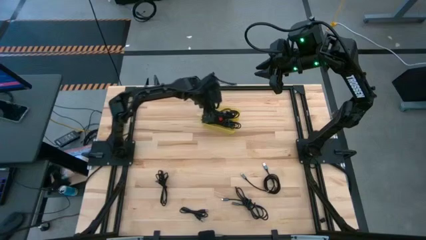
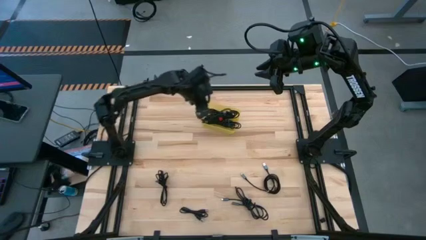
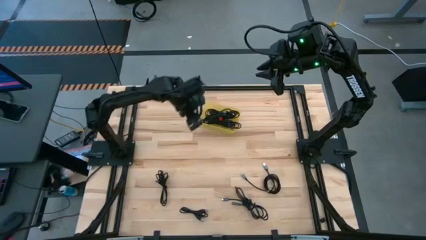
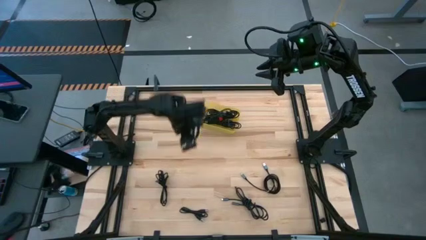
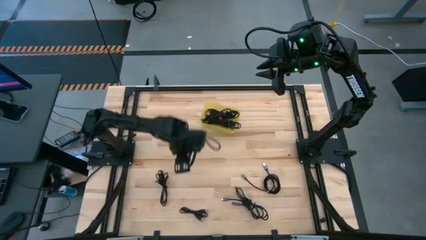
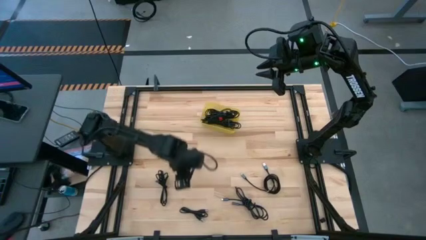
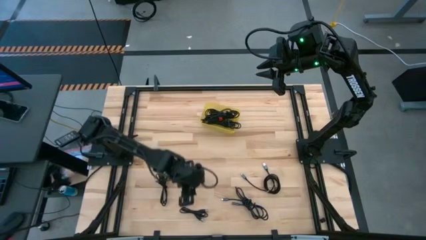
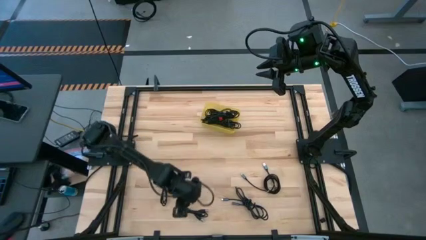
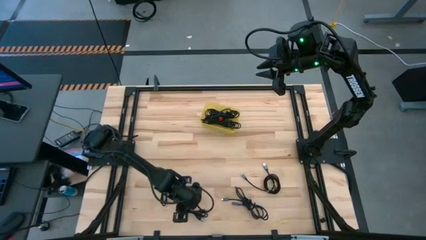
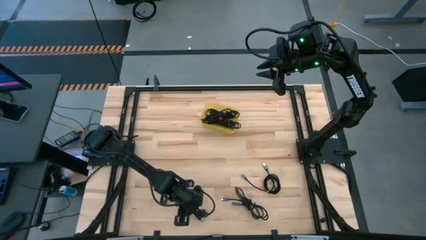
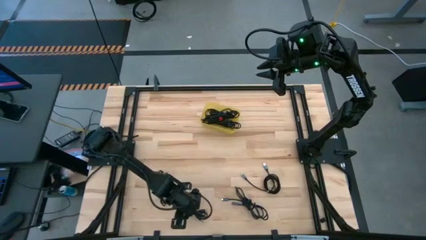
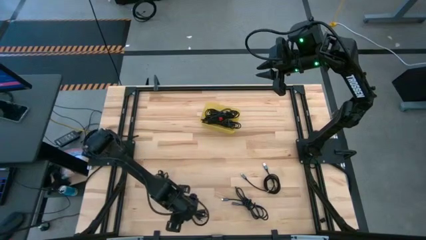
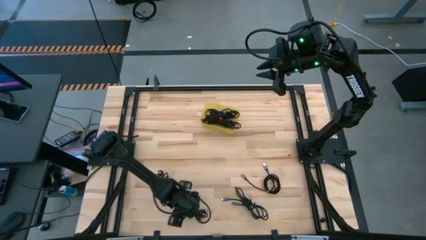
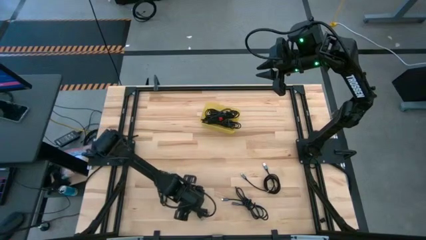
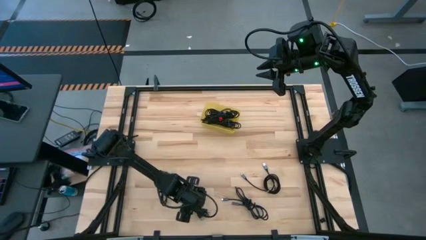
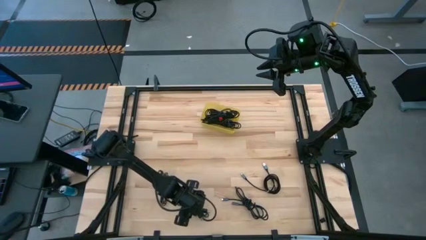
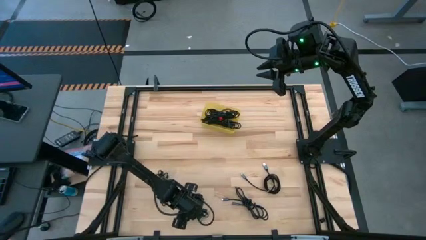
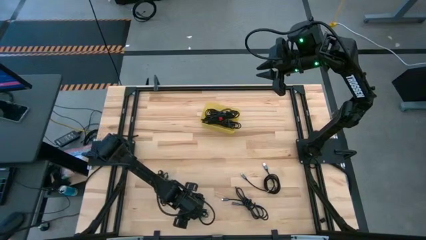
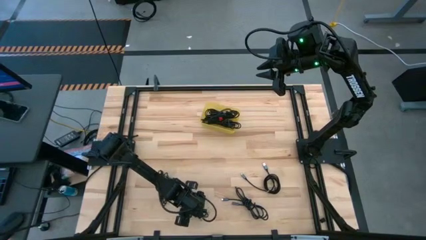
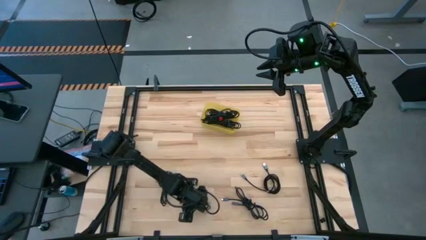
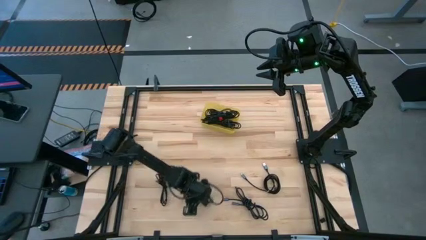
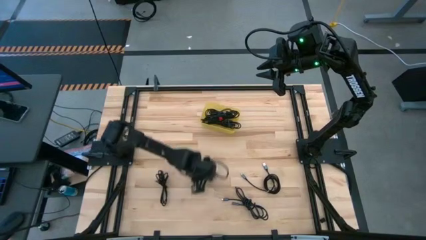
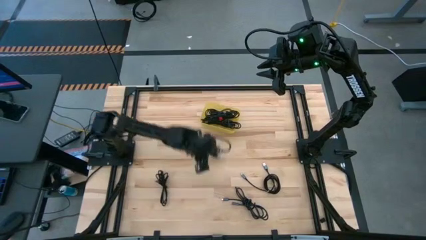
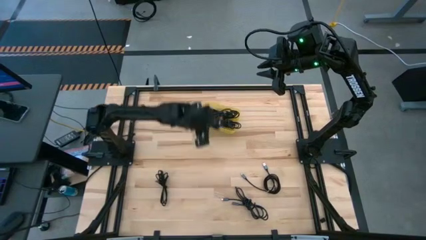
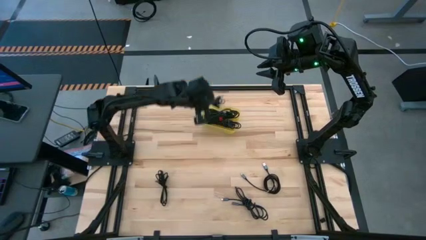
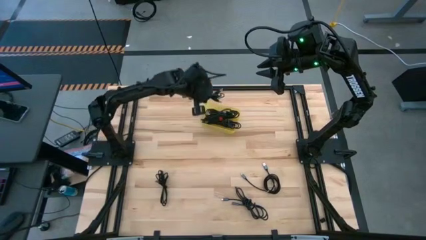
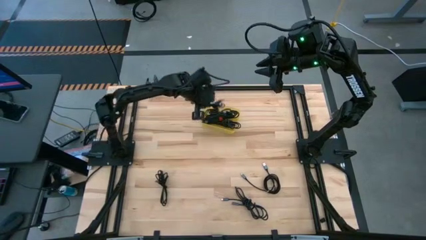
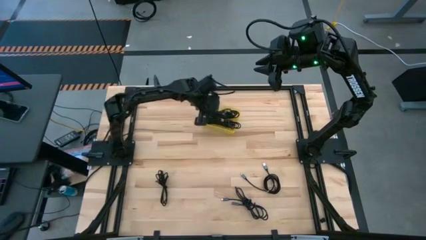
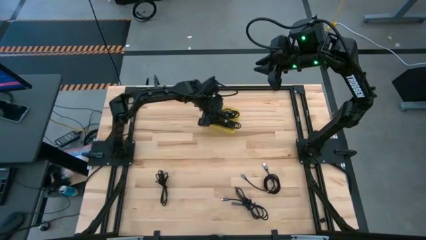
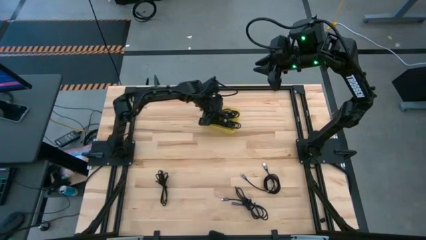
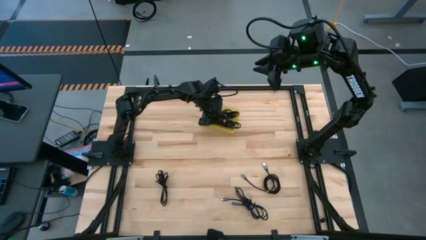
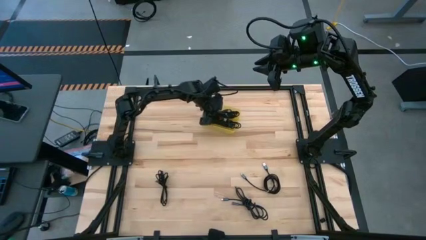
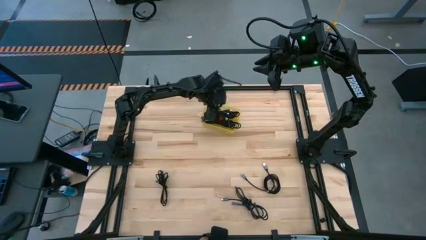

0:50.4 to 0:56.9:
Task: Pick and place USB-C Cables
Put the black charger cable into the yellow bin

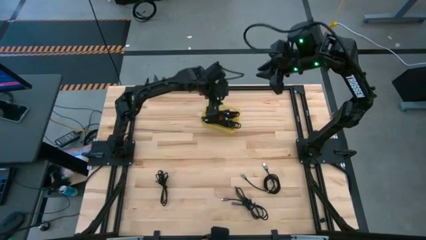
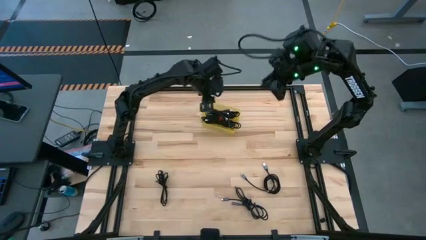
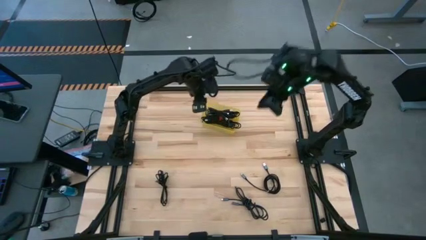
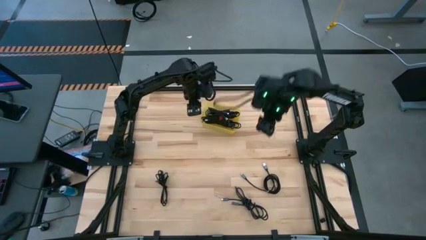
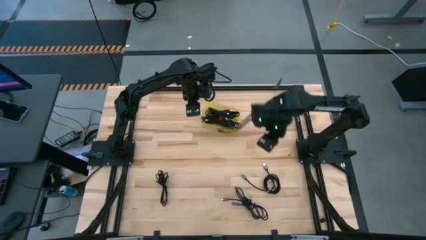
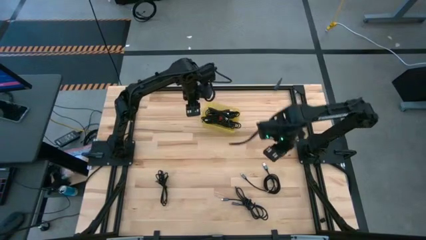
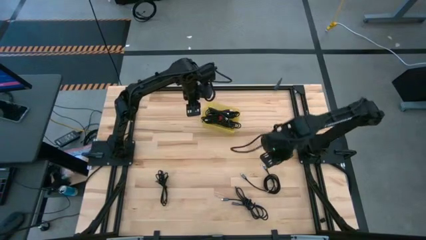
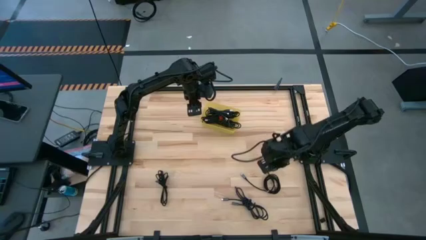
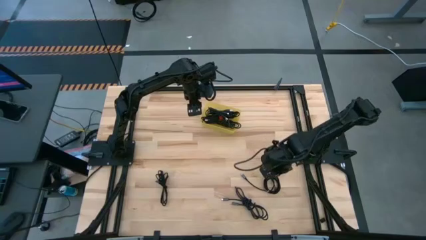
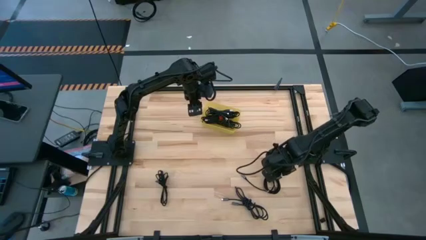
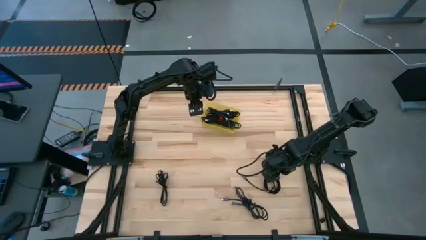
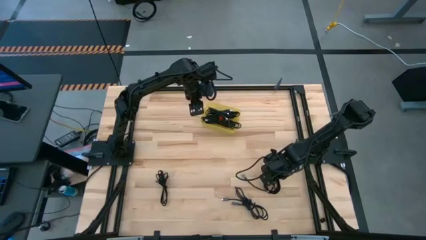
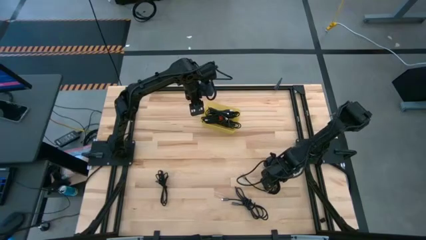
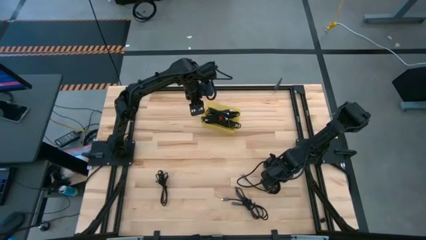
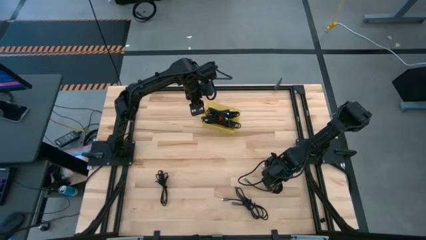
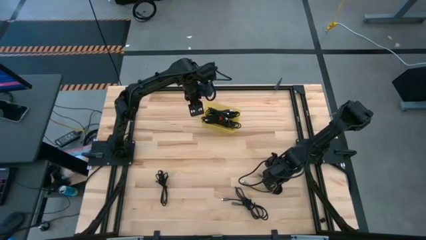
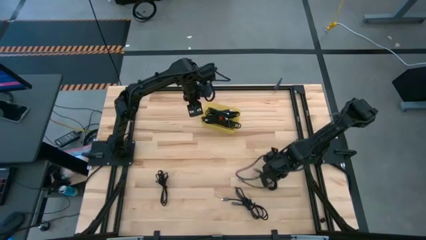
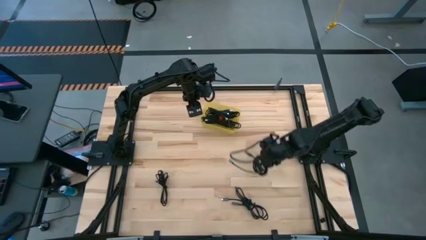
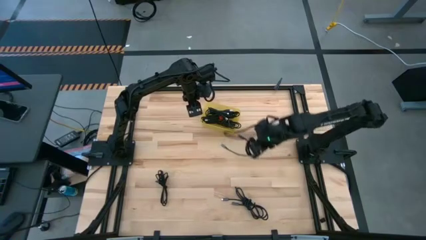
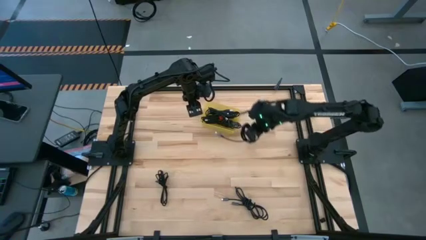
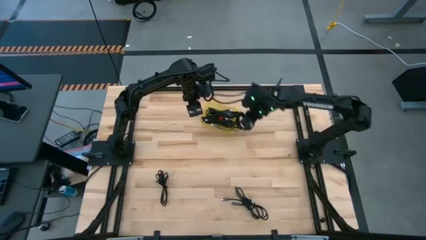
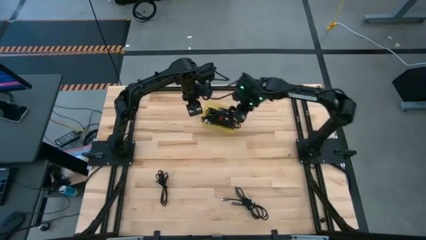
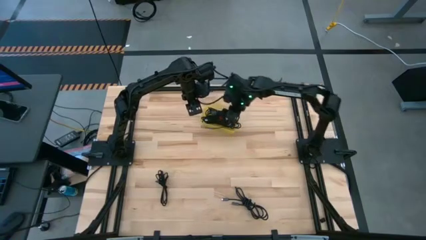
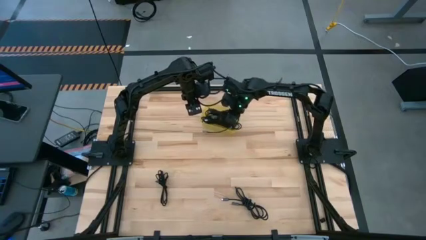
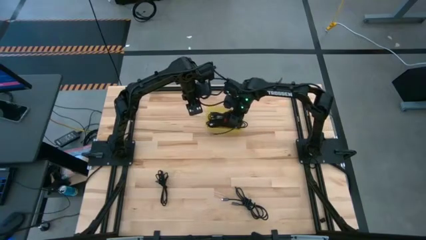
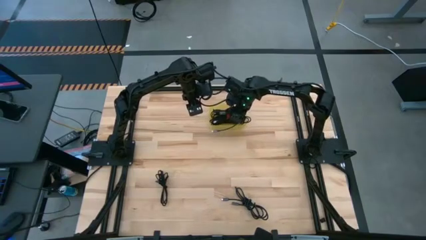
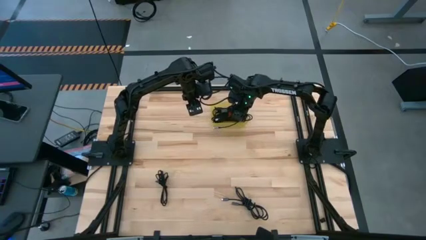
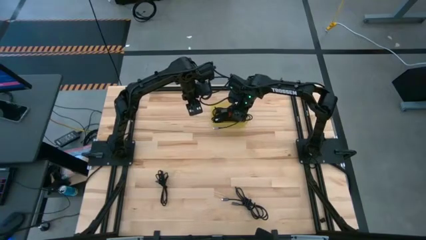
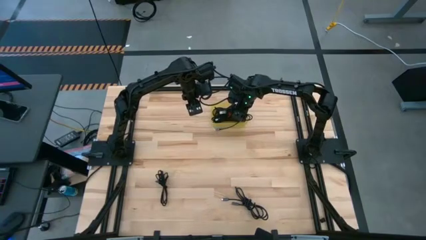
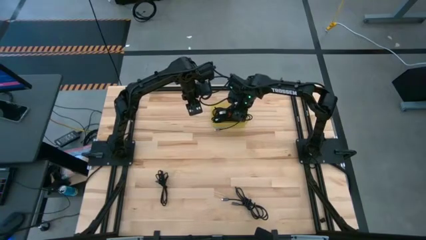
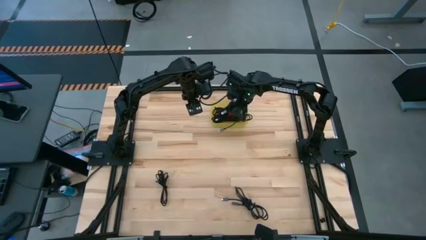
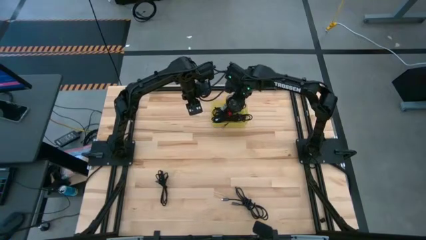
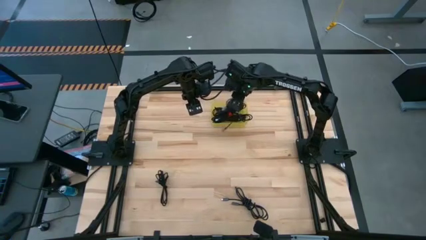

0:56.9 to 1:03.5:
Put the black charger cable into the yellow bin

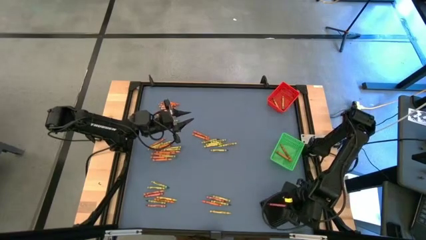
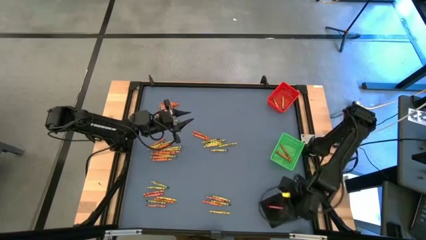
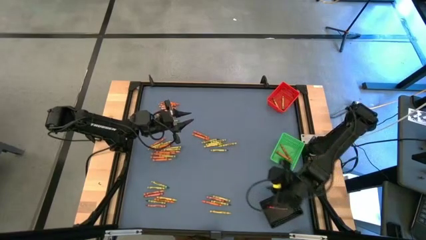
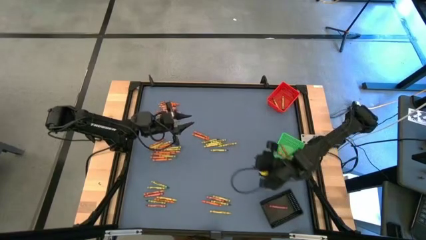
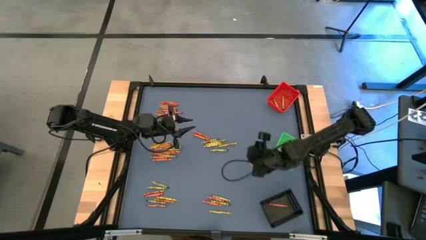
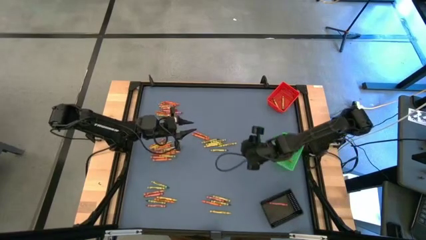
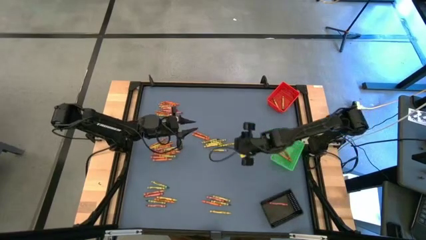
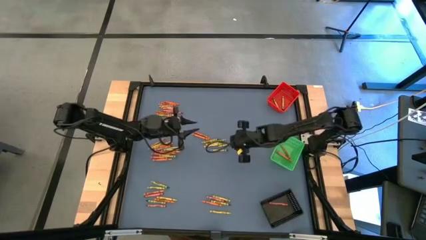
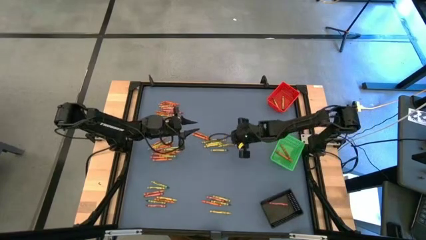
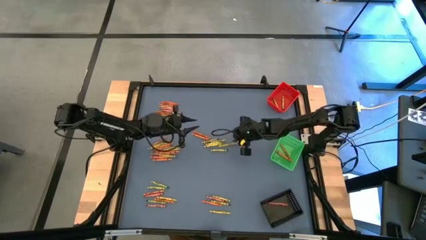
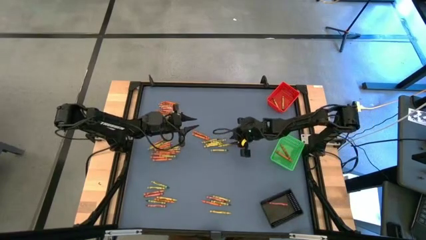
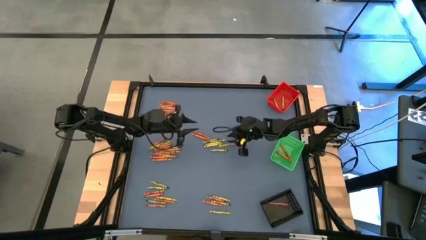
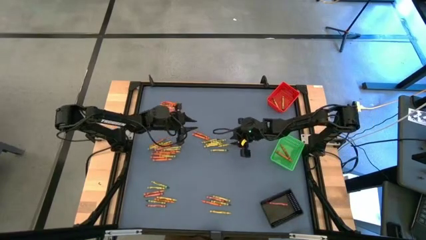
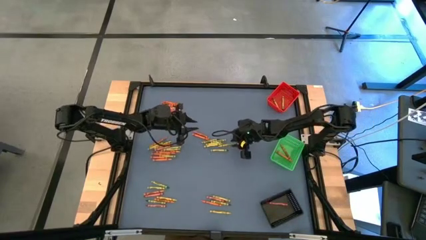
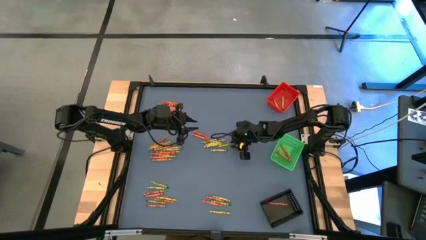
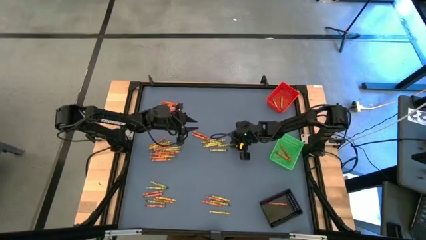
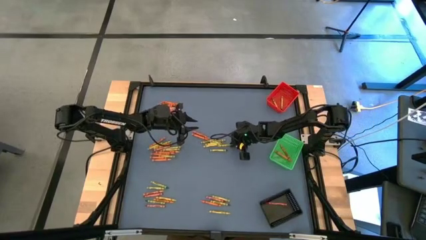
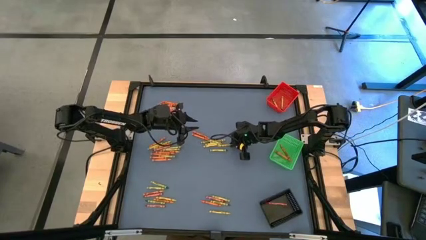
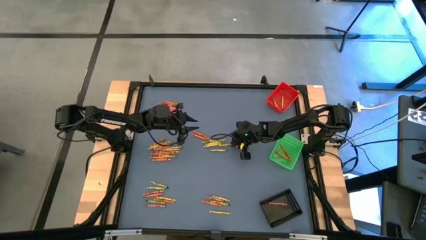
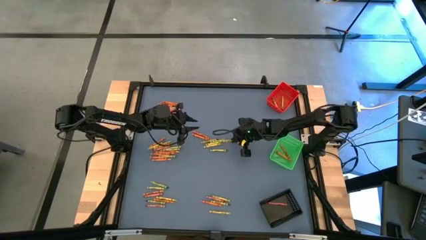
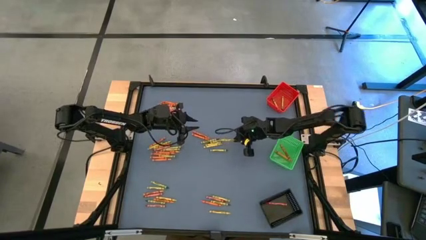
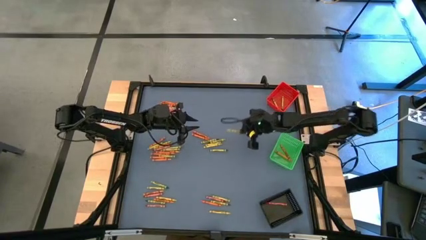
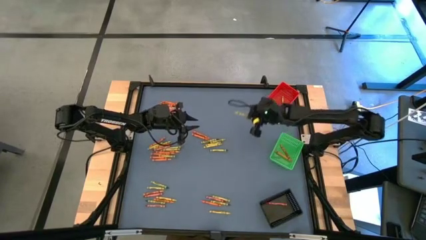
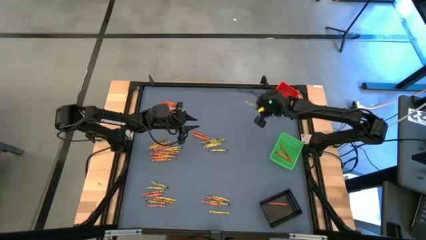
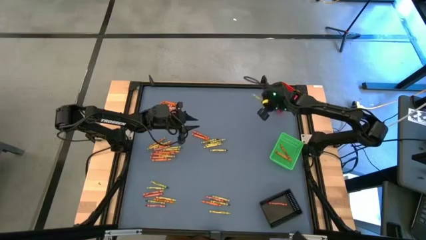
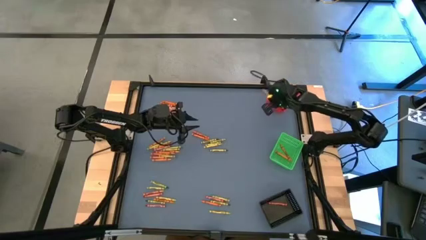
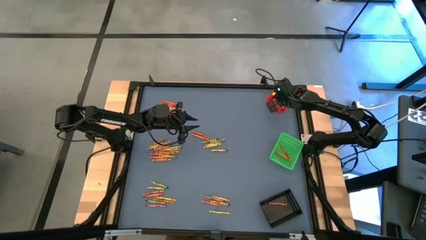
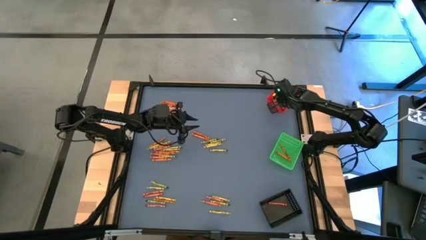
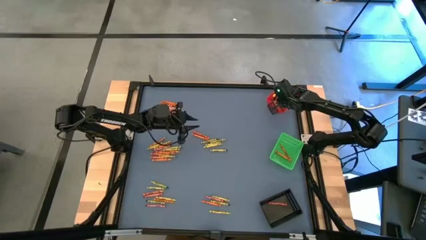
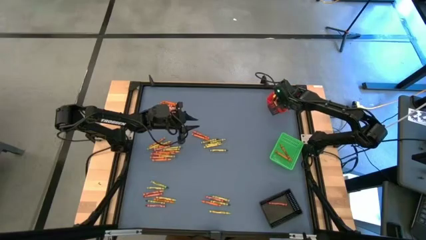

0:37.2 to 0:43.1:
Task: Sort crayons
Put the light green crayon into the red bin
